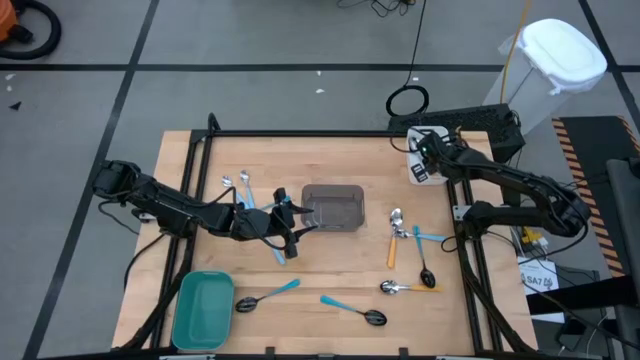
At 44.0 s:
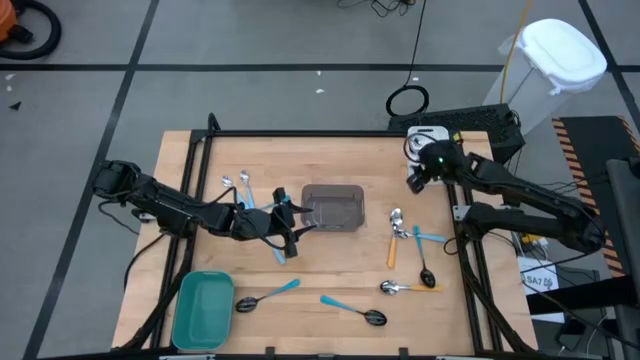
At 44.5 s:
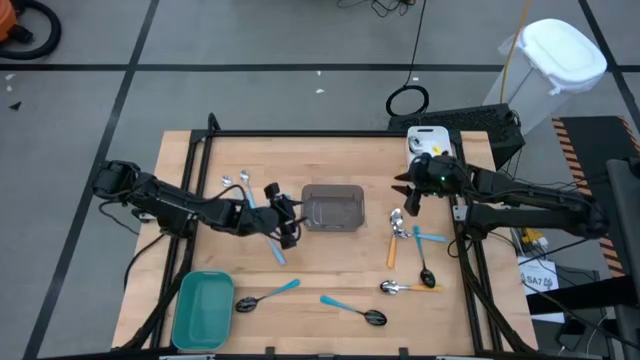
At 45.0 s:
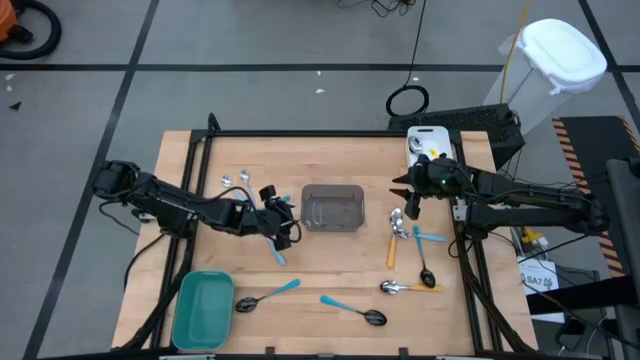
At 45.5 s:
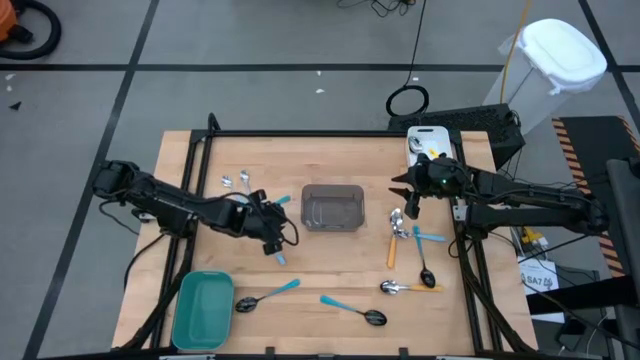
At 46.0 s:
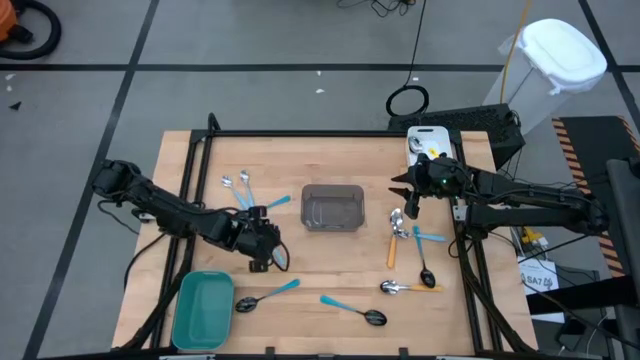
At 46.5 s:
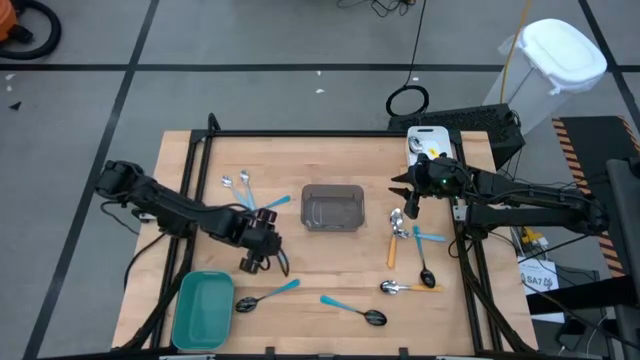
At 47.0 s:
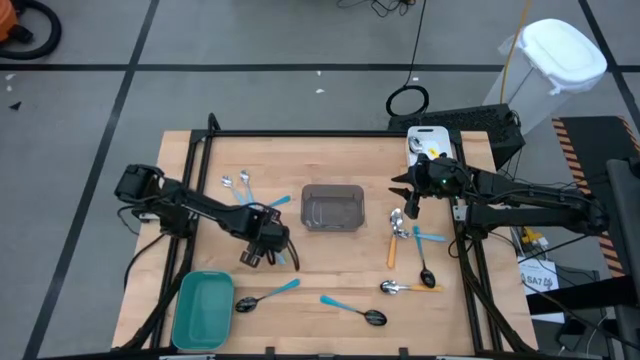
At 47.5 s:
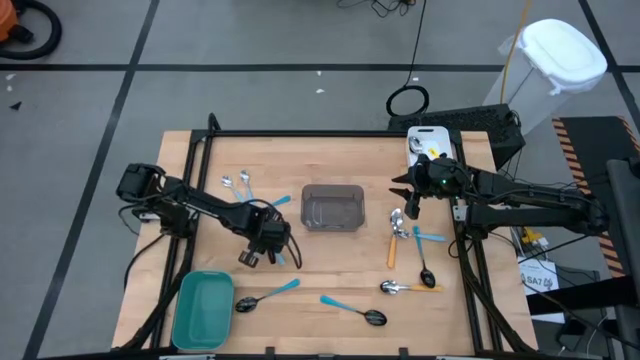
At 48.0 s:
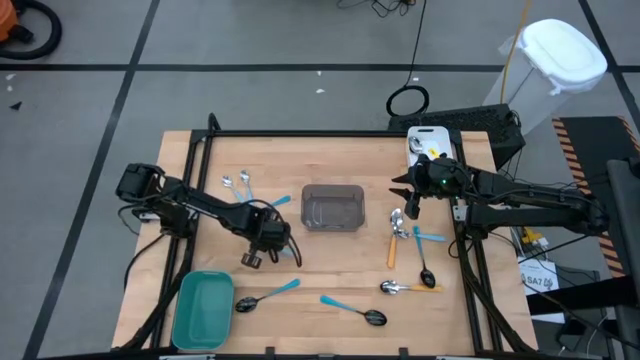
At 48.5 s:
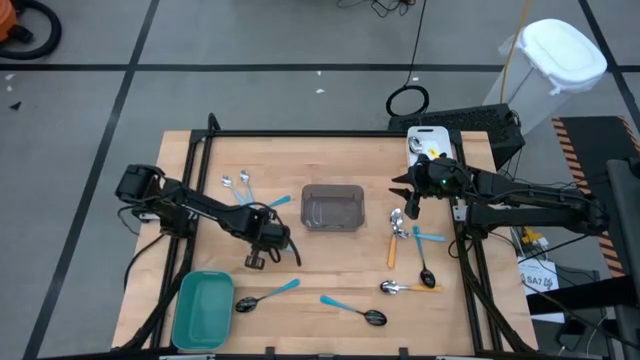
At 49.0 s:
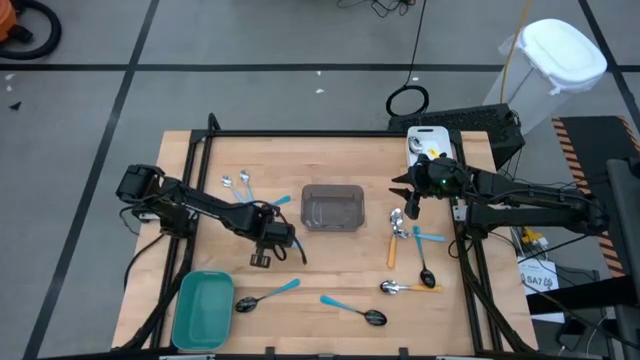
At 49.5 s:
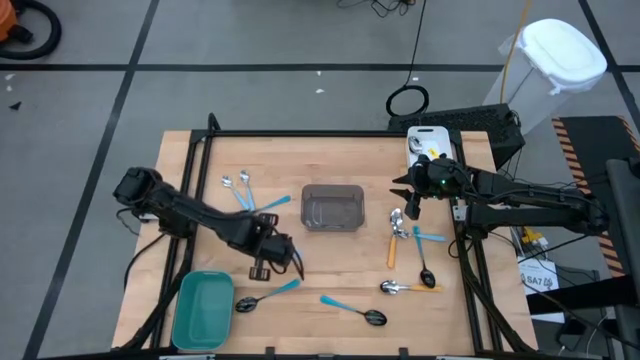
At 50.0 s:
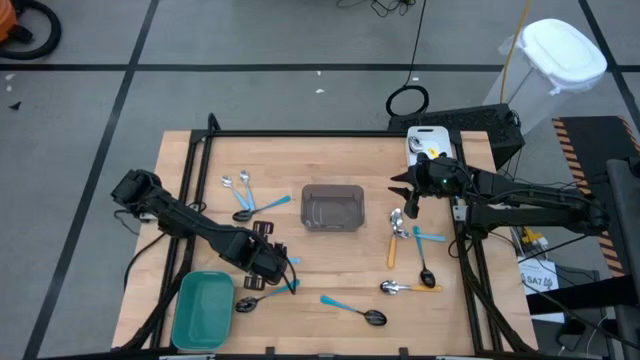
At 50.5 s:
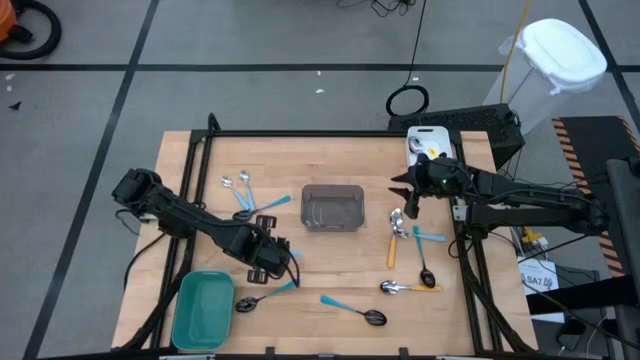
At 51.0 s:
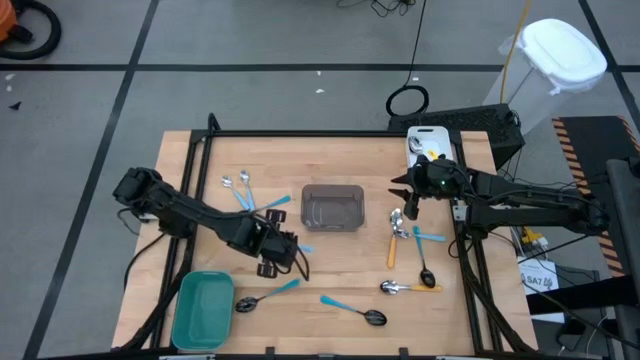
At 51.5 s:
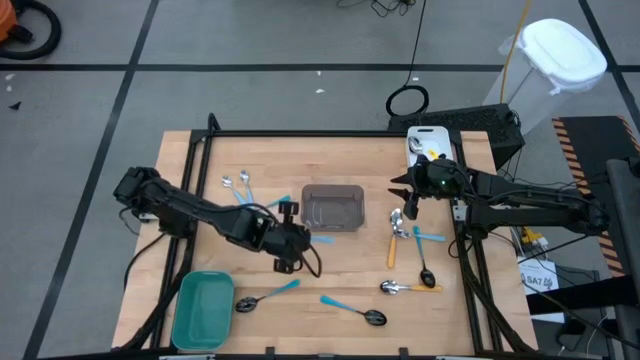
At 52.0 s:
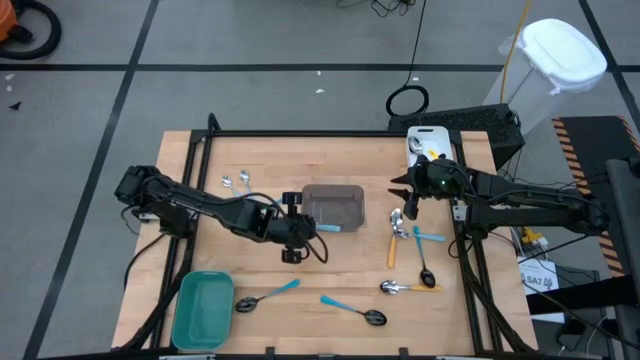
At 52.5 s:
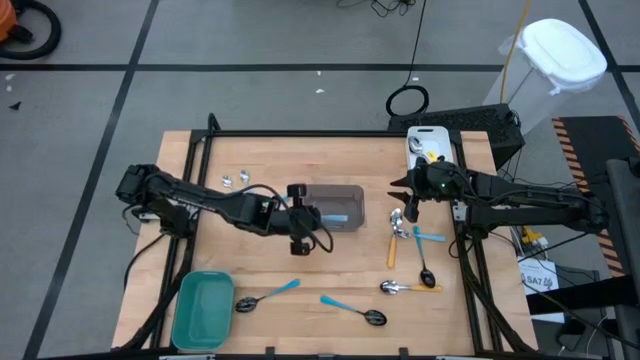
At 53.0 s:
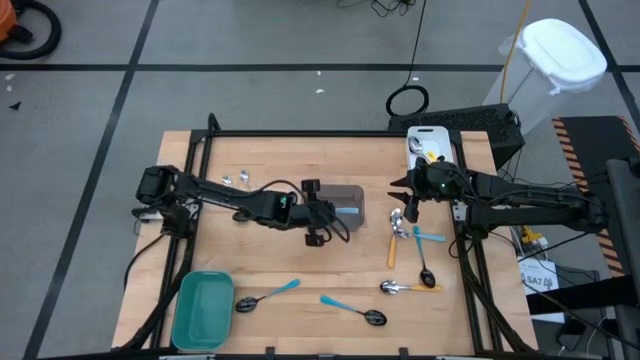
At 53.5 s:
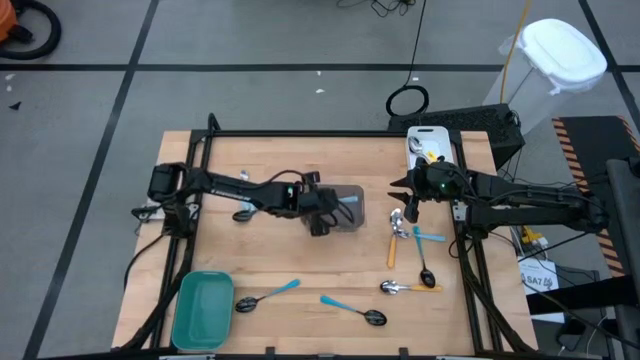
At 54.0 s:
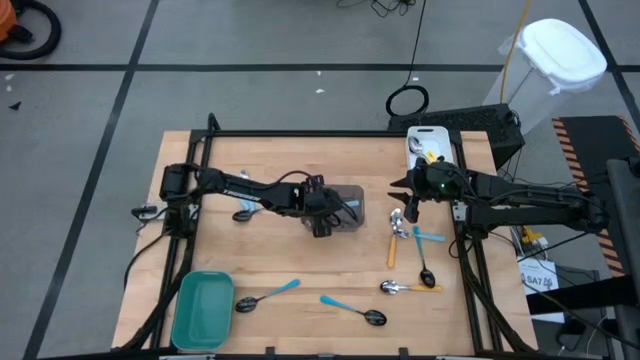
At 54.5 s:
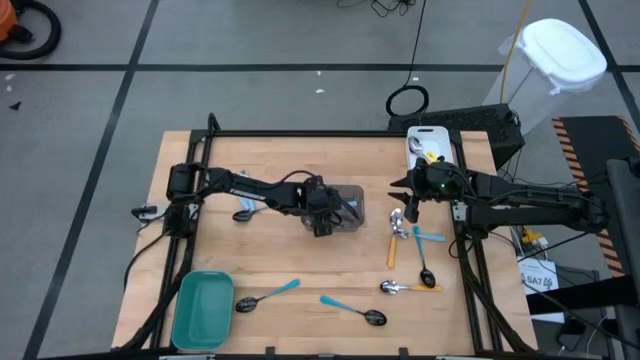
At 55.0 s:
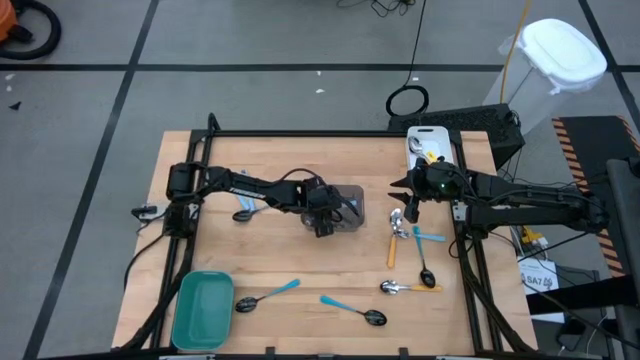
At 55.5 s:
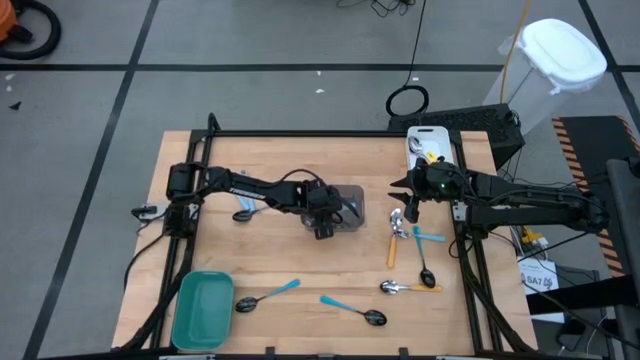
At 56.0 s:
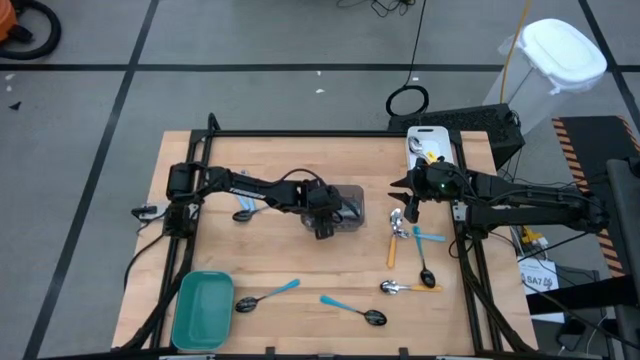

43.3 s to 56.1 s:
Task: Sort silverware by color (type)
Put the bottom left light blue spoon into the black bin

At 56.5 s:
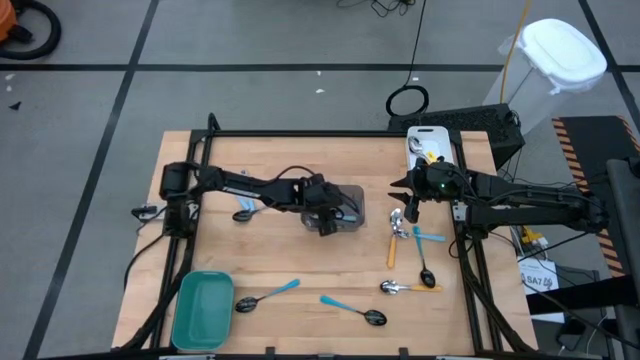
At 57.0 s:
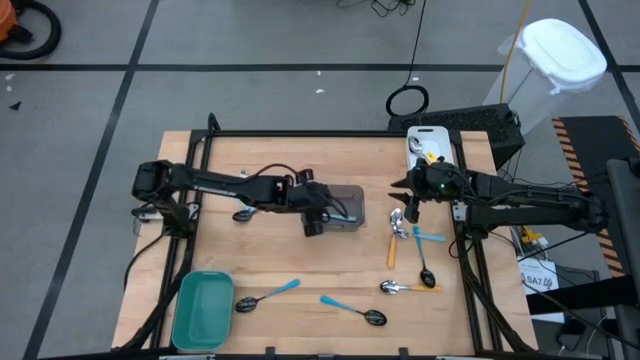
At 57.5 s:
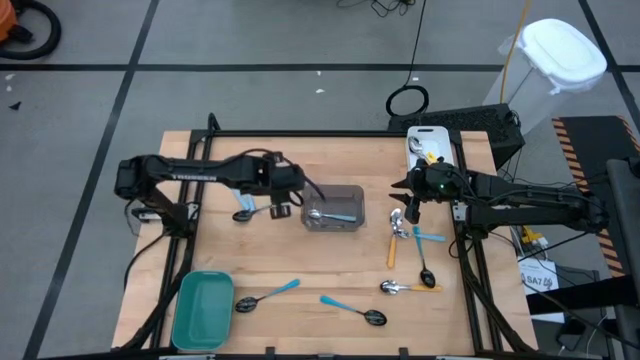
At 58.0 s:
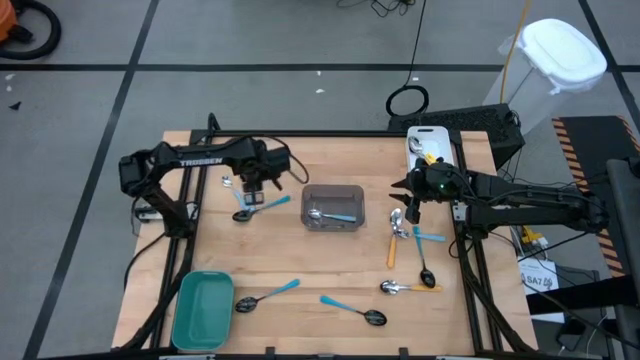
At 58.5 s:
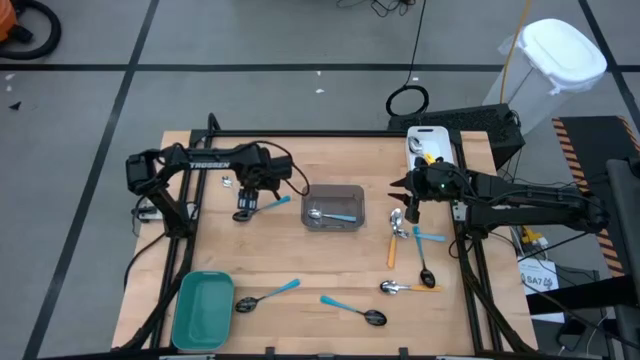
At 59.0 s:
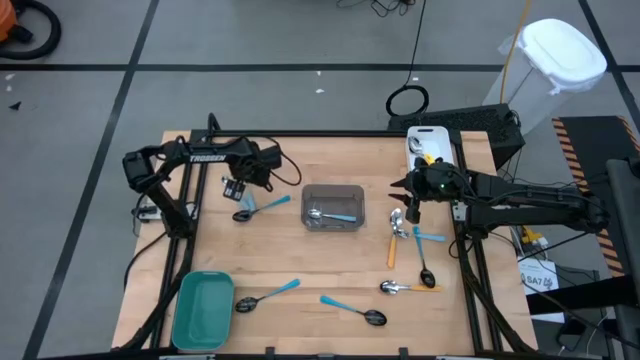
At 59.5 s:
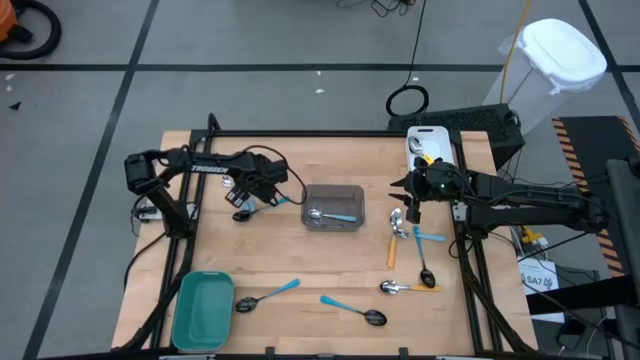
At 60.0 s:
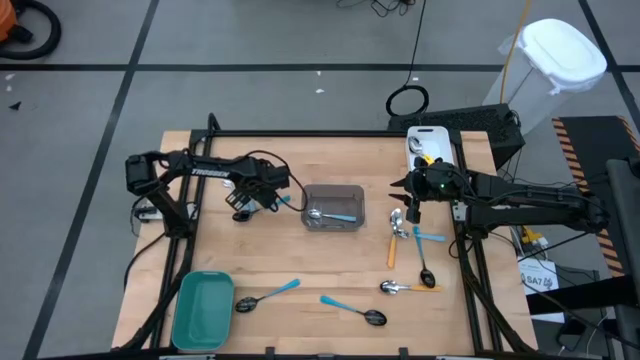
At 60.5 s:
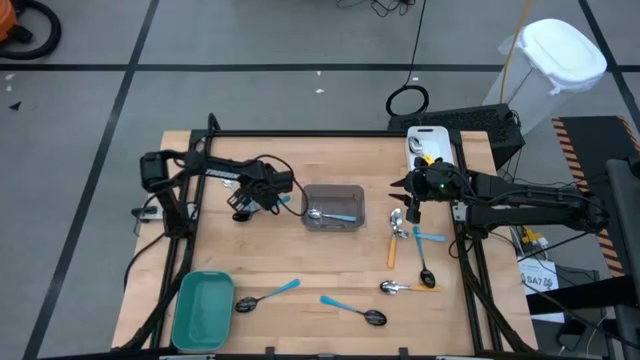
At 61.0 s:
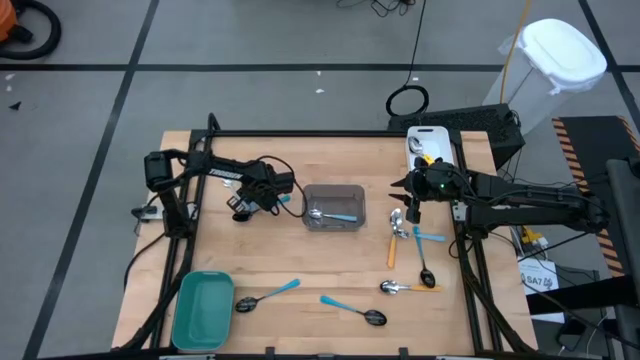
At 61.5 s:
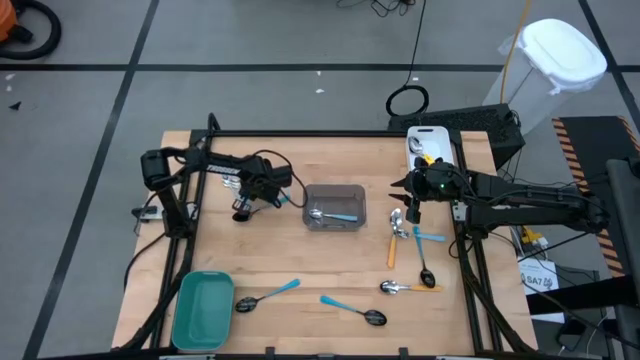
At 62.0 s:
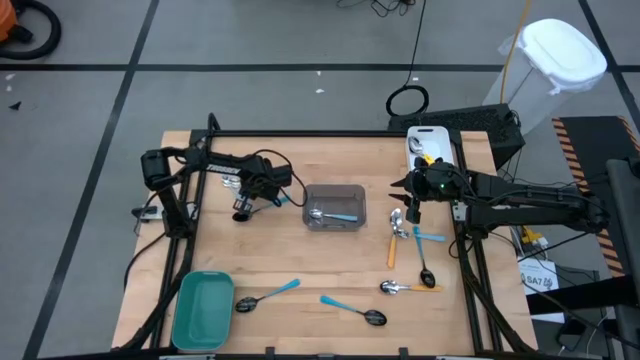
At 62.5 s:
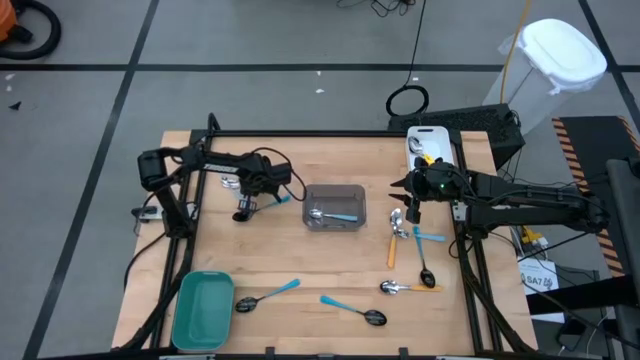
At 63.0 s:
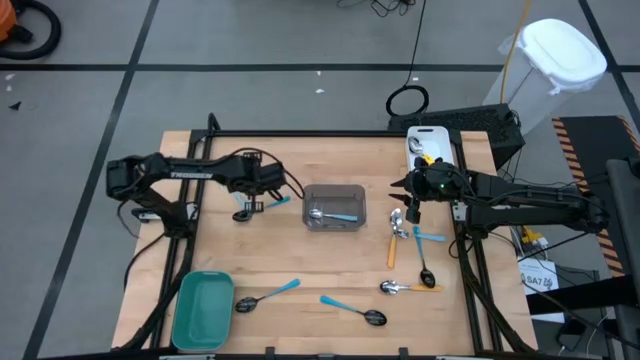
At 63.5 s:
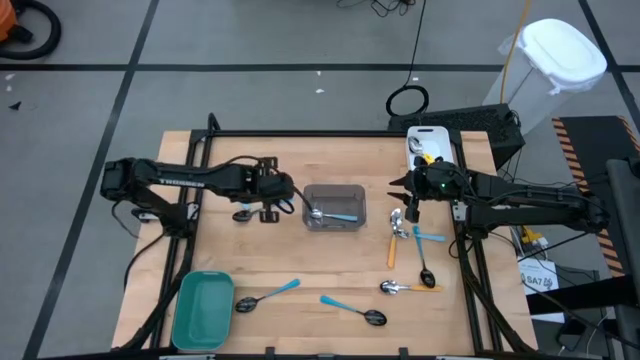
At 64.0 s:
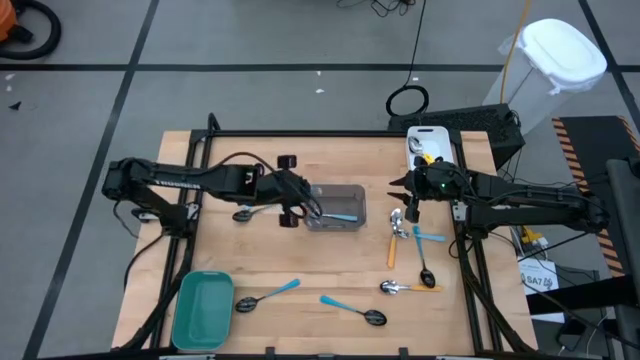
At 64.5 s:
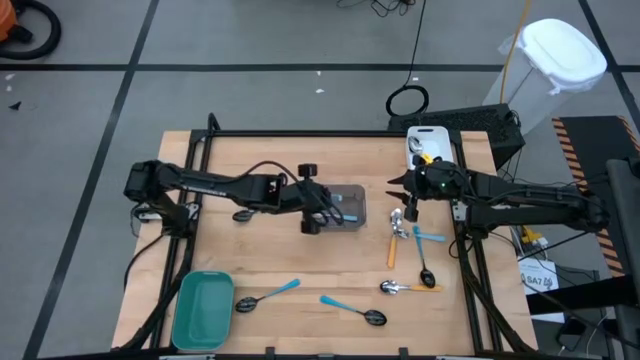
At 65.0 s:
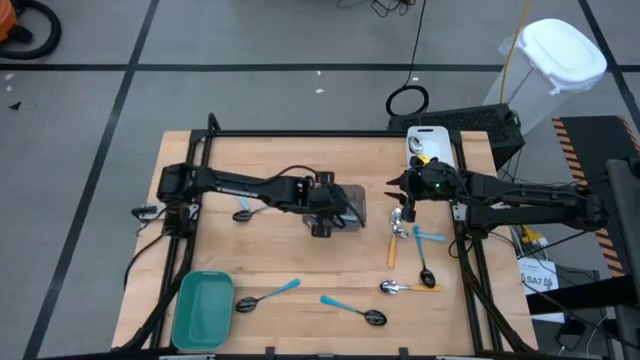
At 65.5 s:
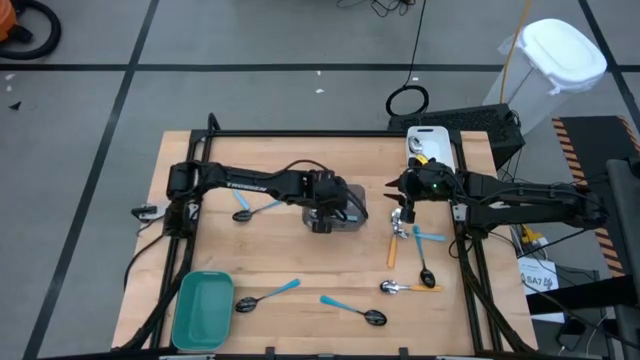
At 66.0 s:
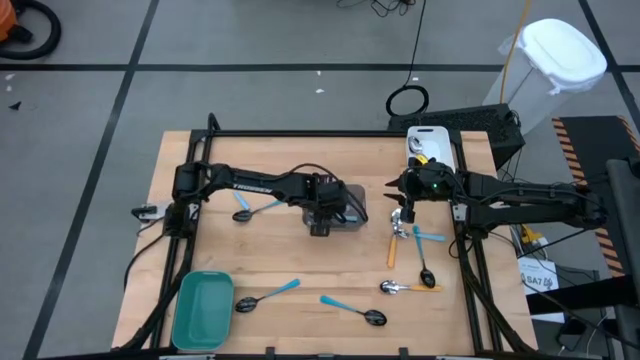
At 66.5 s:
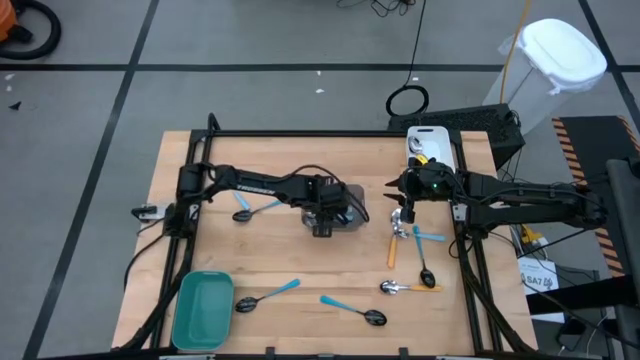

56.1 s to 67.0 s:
Put the top right light blue spoon into the black bin
